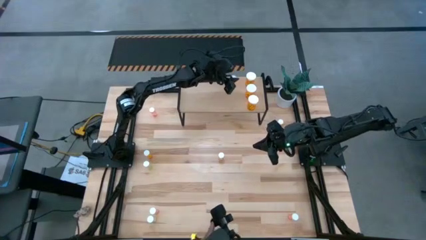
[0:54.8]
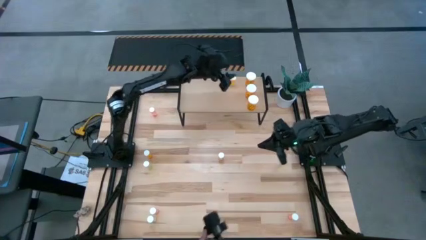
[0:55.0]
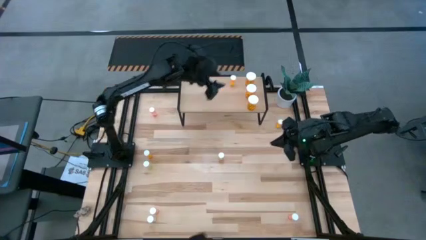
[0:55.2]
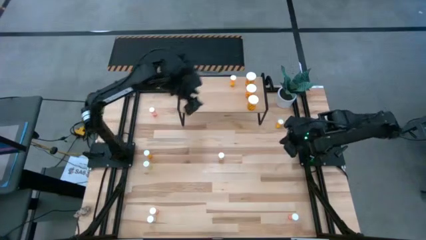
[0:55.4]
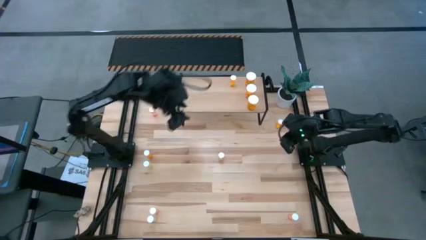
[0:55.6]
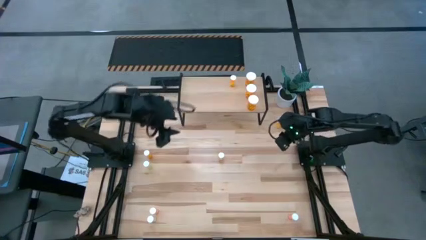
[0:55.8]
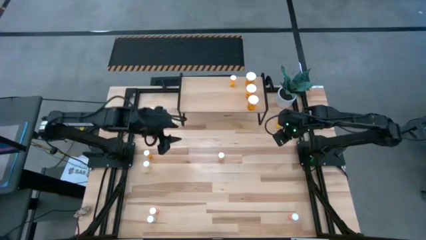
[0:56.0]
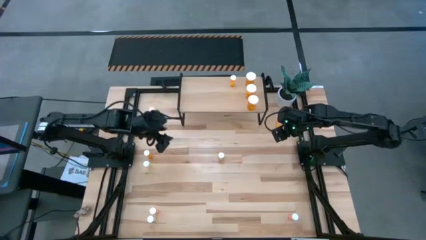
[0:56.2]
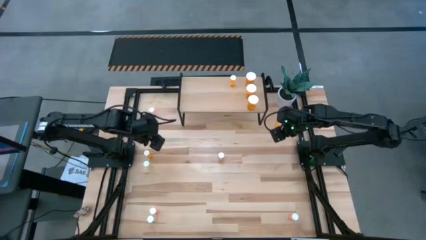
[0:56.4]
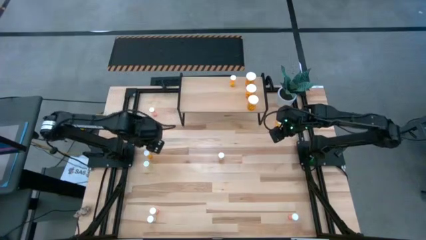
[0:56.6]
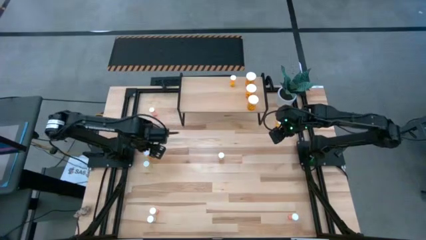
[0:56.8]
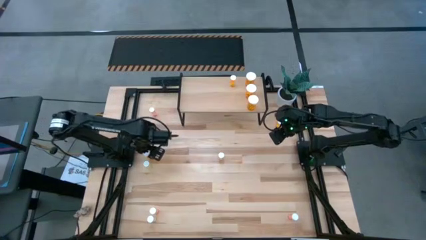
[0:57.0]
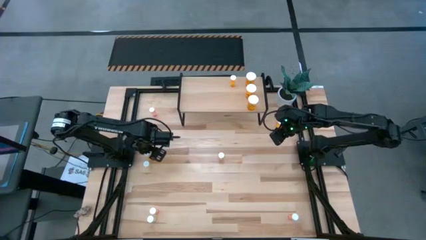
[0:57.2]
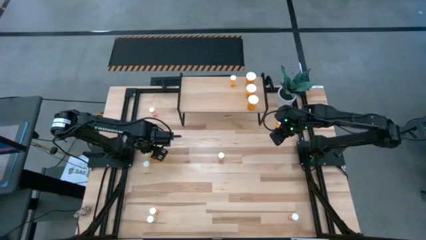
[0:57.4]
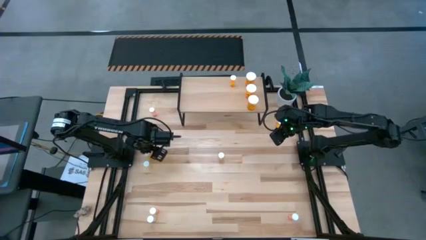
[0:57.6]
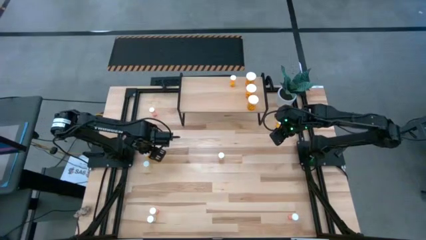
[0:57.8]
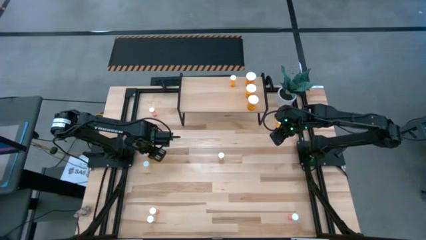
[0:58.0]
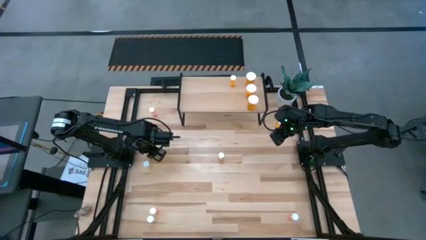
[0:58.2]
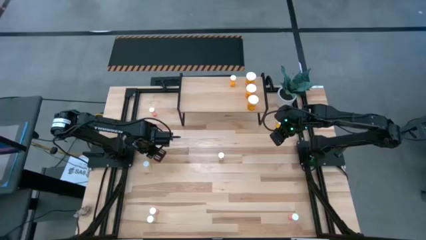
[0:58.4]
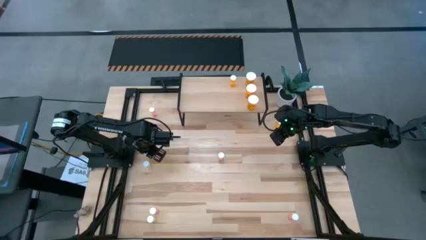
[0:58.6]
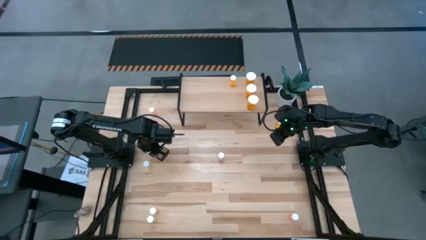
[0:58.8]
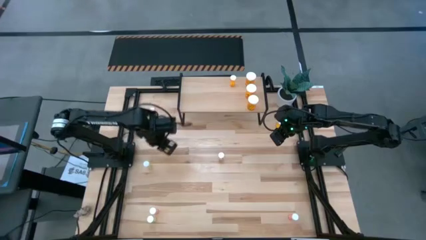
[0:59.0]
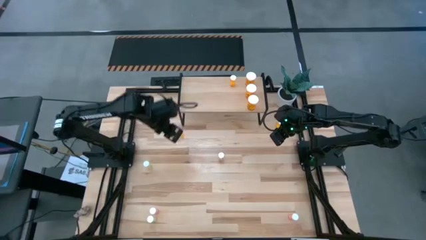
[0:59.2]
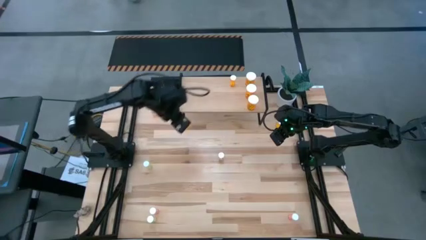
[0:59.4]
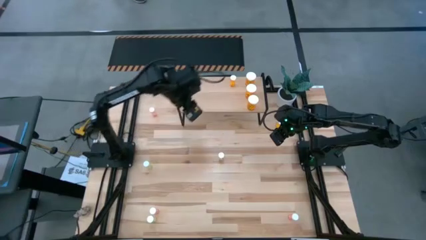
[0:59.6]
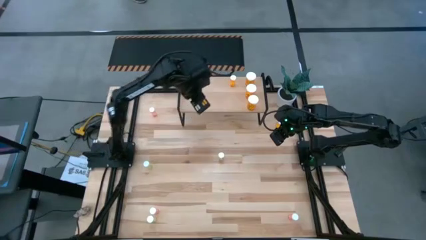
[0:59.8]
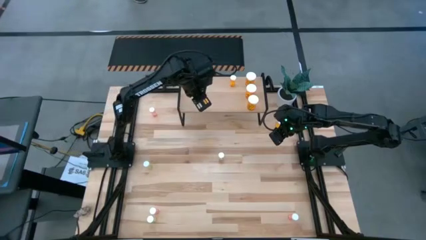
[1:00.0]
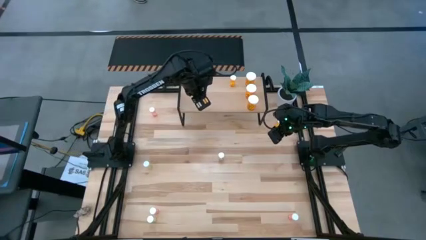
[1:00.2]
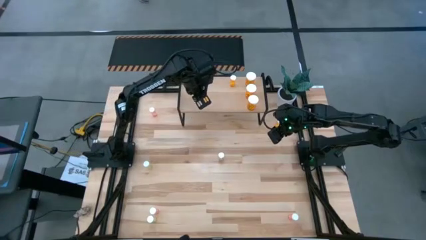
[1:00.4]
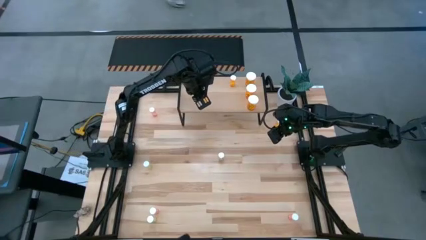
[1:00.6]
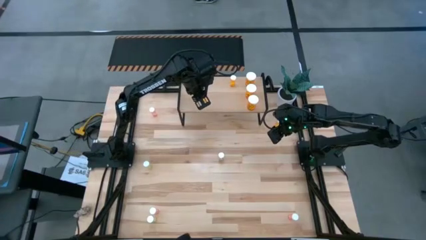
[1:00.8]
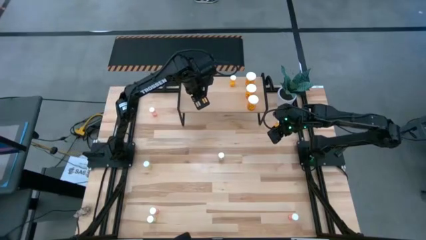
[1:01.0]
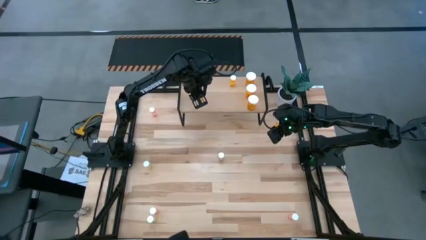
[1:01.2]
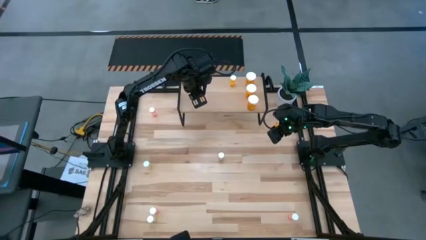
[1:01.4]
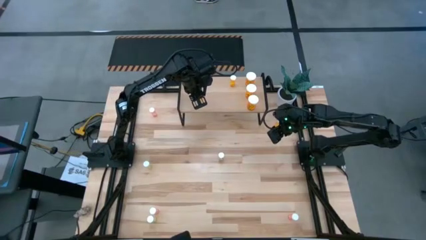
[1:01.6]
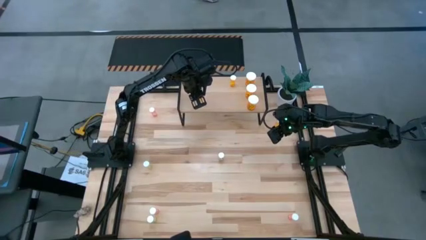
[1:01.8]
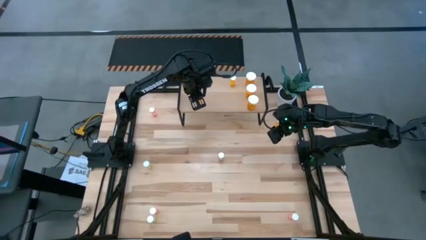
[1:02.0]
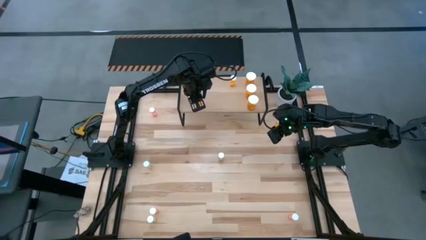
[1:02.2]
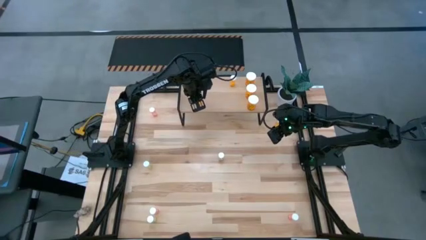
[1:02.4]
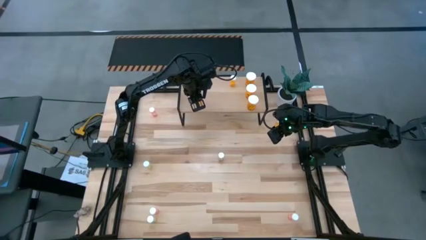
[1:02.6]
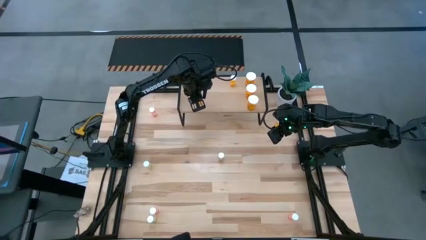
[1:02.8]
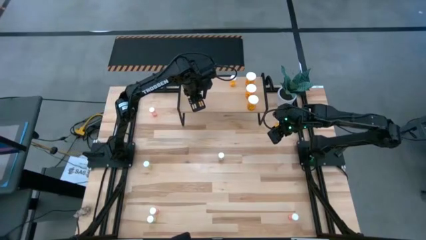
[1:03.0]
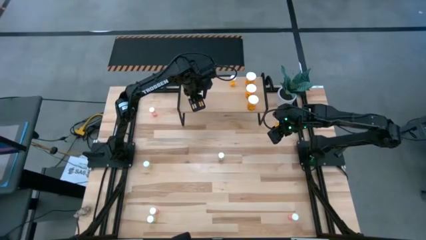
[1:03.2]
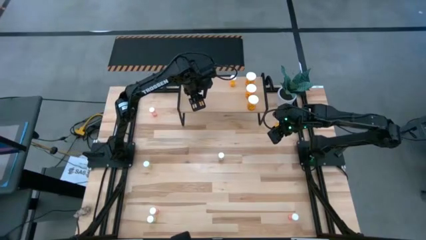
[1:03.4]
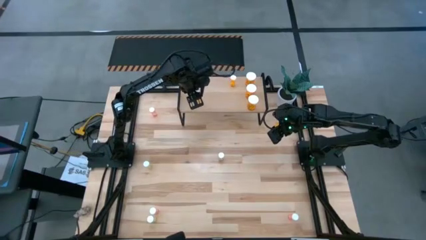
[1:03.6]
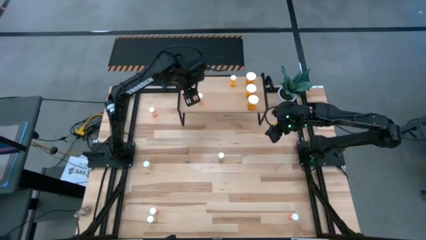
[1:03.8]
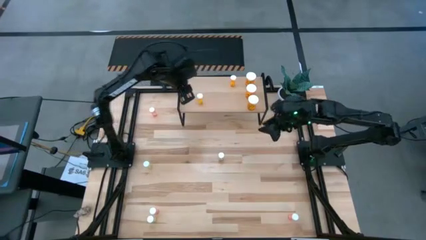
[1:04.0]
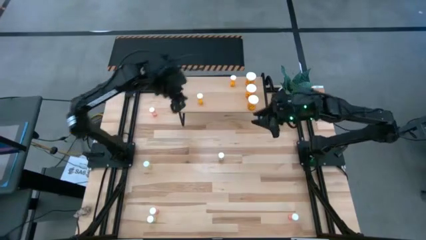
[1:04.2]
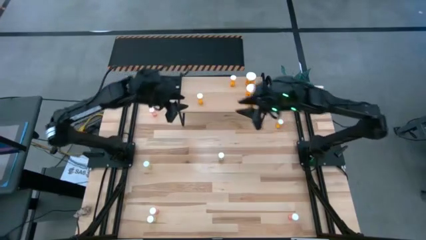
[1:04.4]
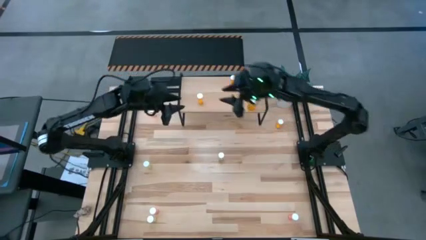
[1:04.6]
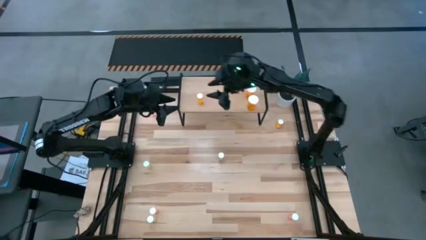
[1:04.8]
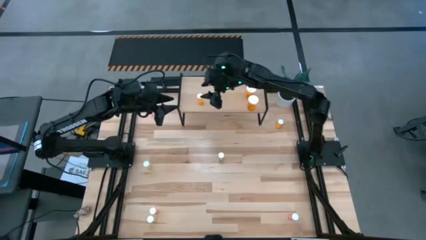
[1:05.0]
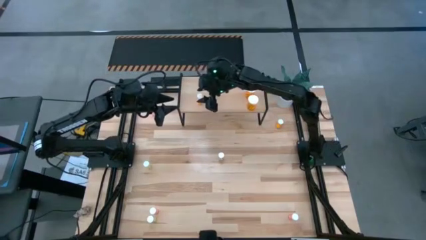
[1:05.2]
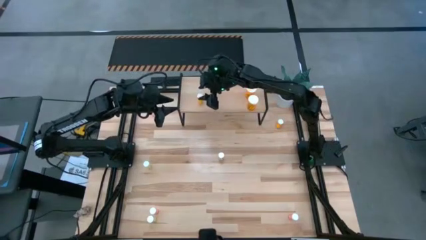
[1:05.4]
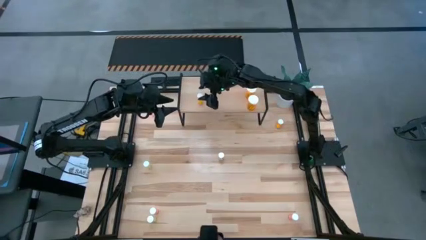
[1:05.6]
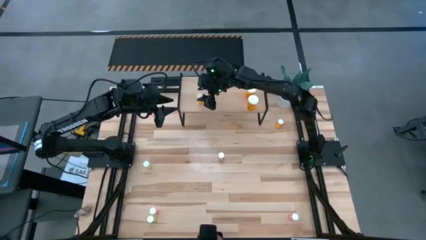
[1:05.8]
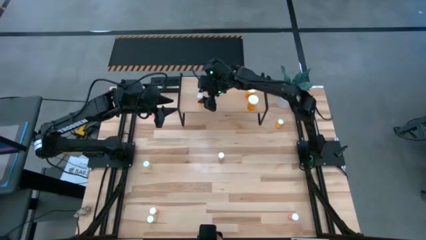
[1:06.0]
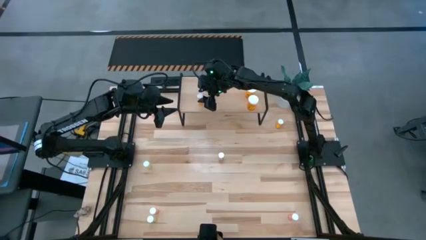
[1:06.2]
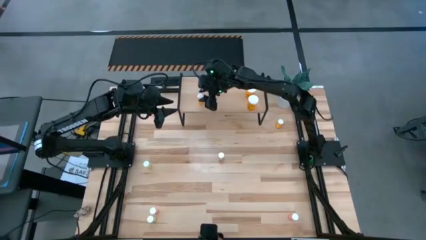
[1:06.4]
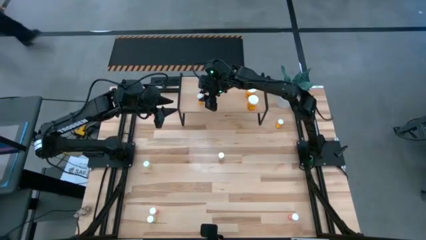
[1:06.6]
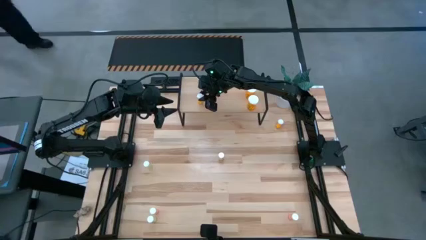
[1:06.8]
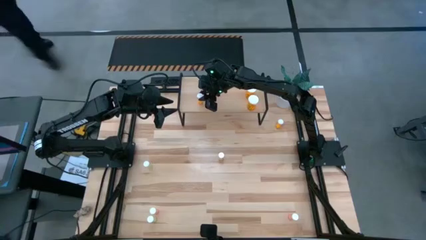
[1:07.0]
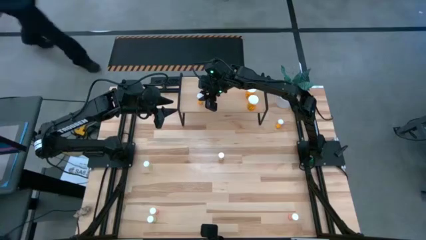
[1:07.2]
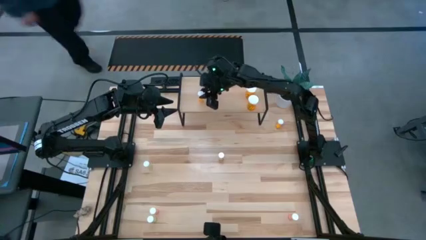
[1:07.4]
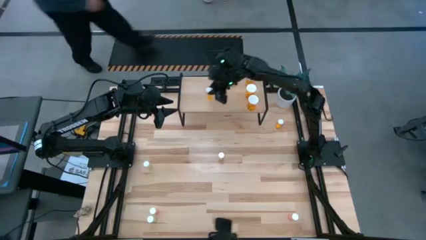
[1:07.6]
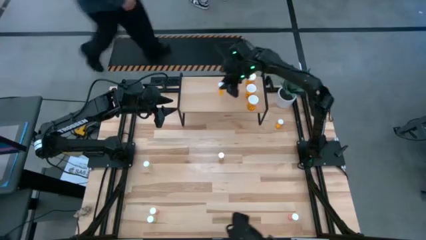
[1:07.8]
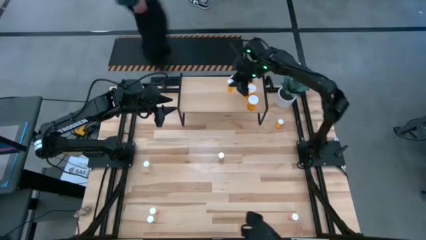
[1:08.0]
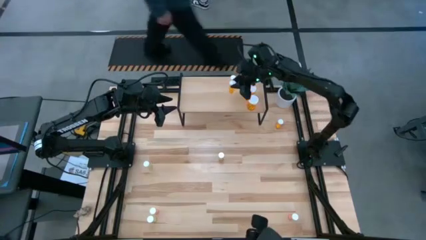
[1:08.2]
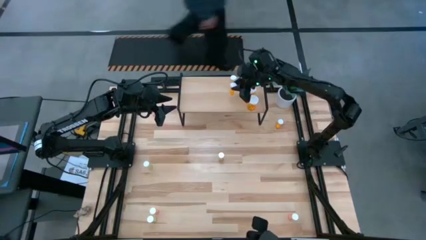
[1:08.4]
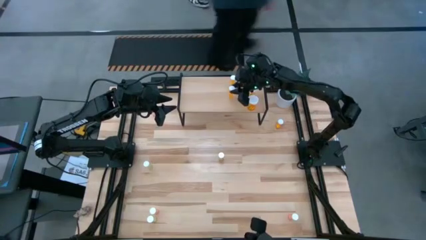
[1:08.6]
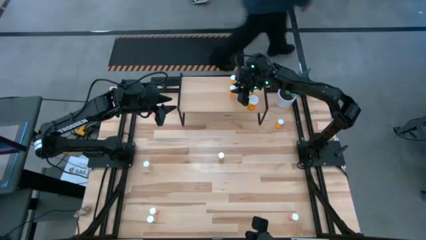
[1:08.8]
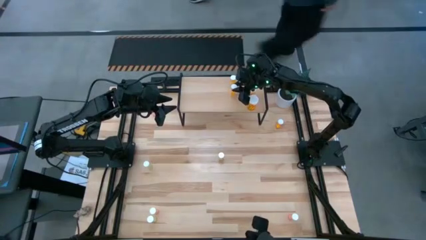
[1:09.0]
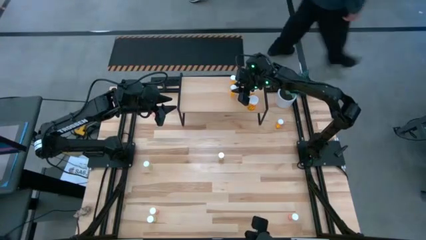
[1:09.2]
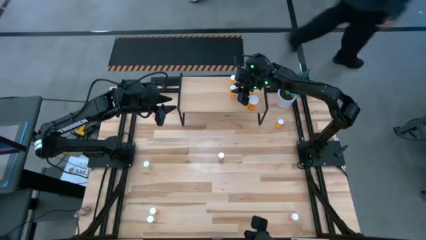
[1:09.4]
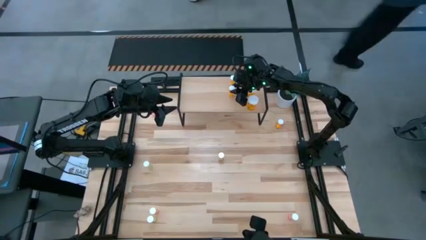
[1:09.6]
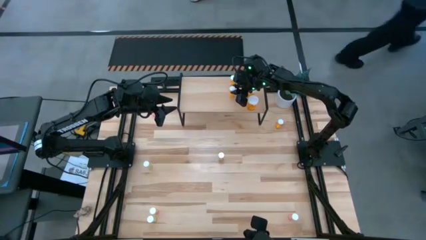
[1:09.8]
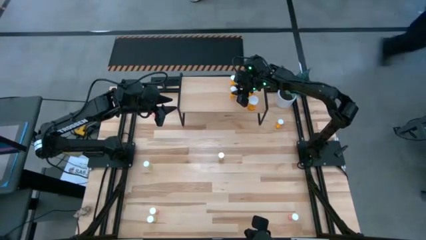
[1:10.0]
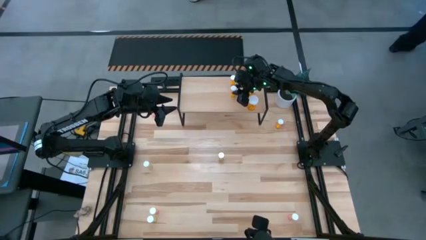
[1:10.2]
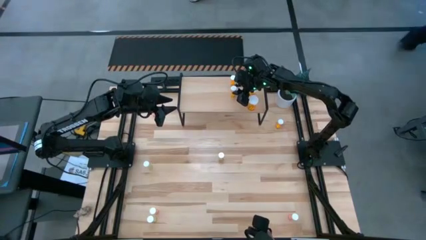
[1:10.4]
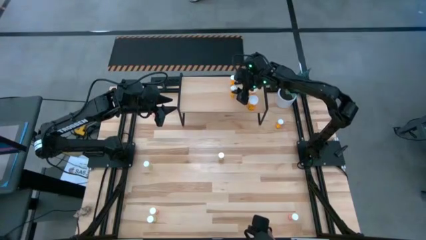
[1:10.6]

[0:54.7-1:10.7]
Task: Pick and place medicine bottles onto shelf by color
Put the bottom small orange pill bottle on the shelf aligned with the other small orange pill bottle
